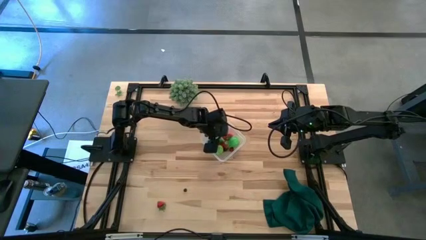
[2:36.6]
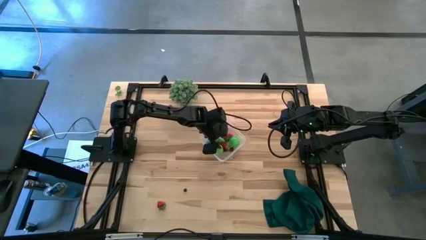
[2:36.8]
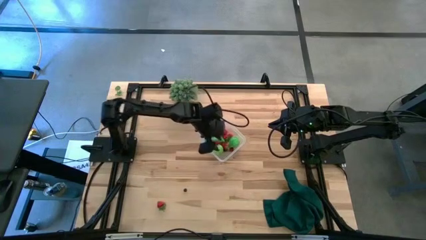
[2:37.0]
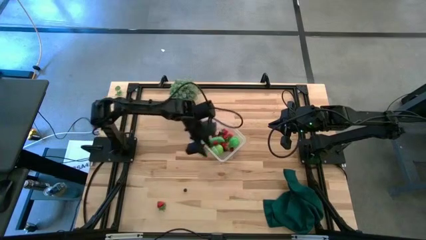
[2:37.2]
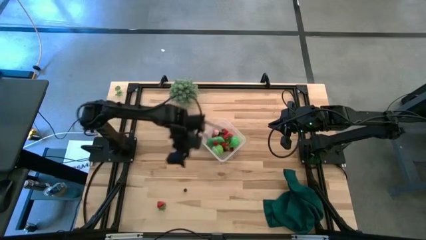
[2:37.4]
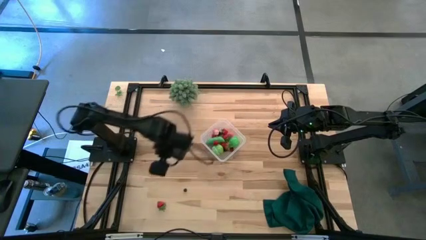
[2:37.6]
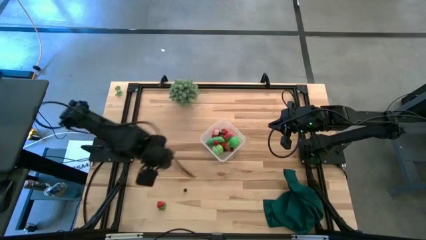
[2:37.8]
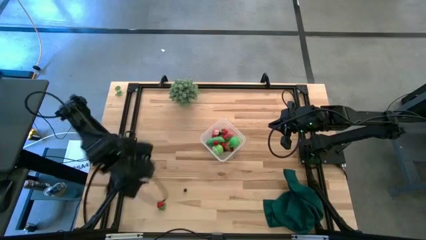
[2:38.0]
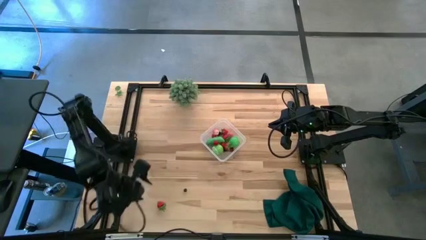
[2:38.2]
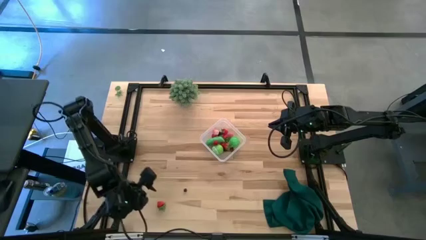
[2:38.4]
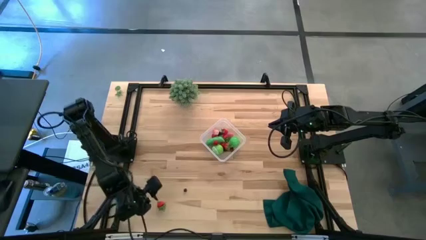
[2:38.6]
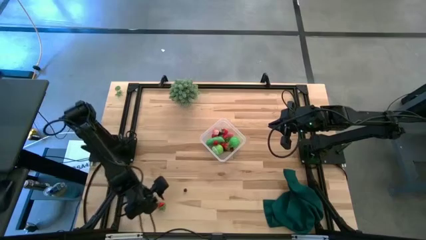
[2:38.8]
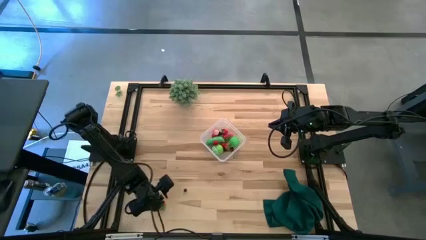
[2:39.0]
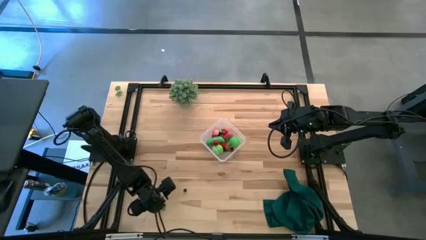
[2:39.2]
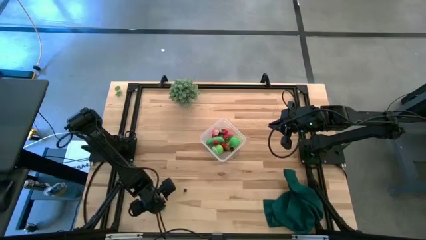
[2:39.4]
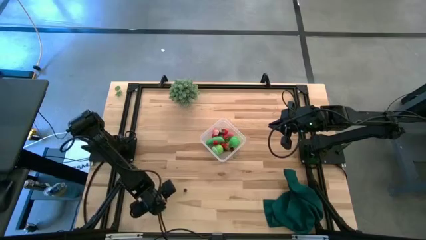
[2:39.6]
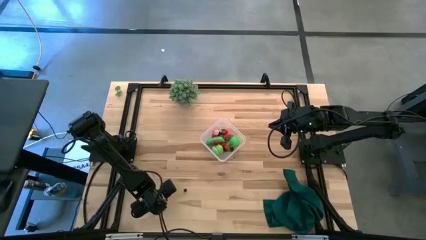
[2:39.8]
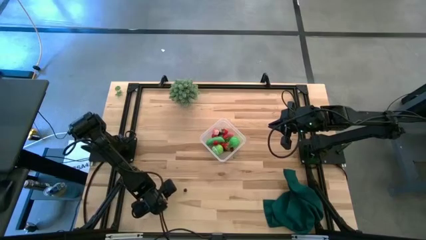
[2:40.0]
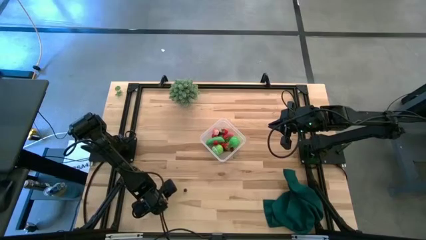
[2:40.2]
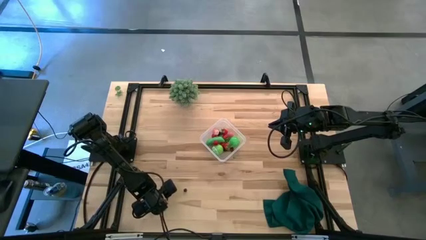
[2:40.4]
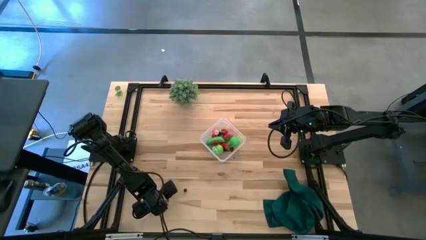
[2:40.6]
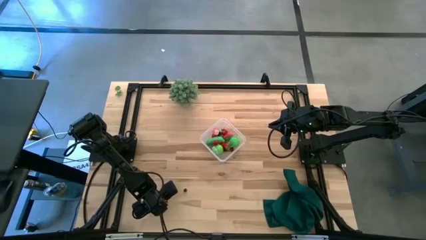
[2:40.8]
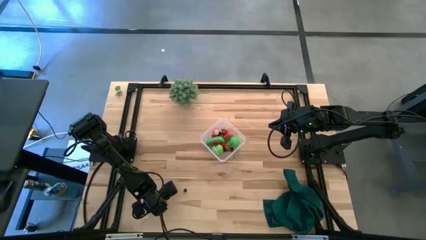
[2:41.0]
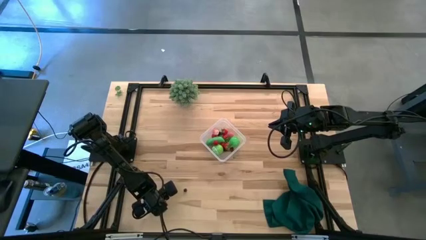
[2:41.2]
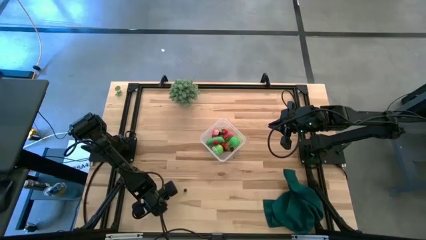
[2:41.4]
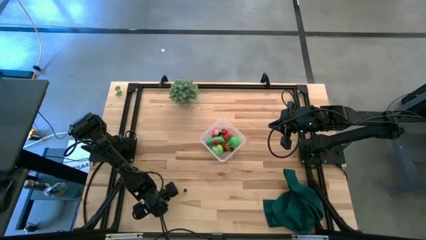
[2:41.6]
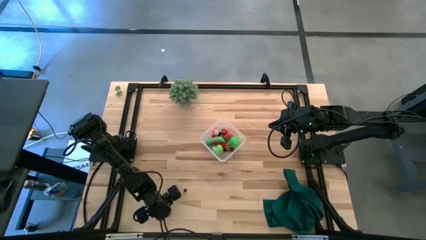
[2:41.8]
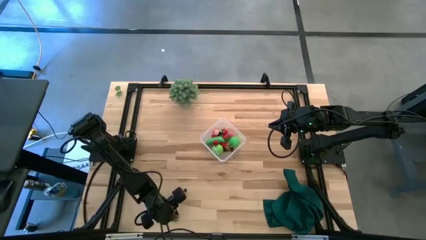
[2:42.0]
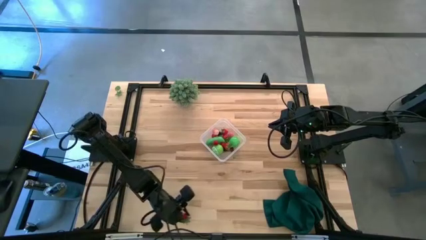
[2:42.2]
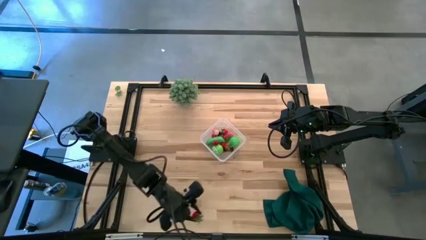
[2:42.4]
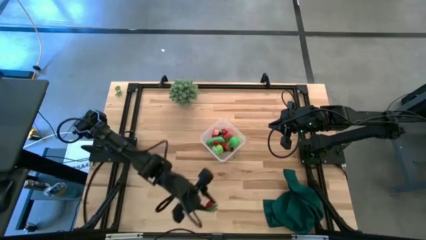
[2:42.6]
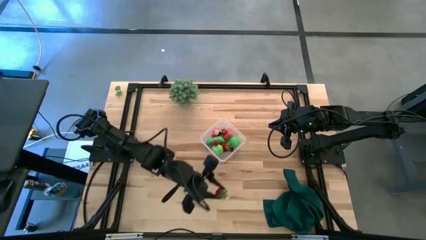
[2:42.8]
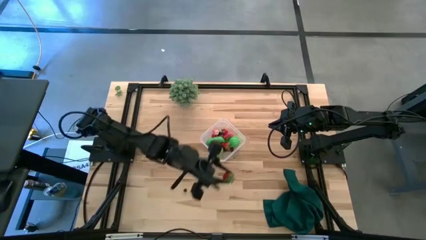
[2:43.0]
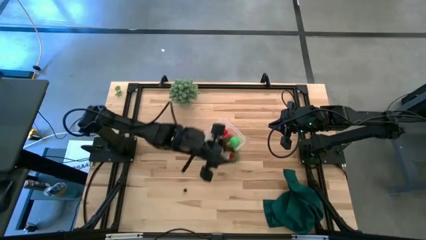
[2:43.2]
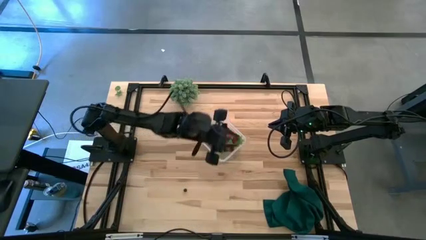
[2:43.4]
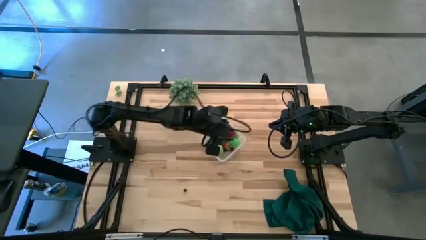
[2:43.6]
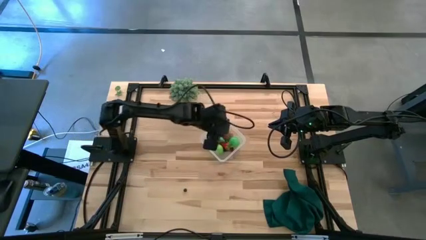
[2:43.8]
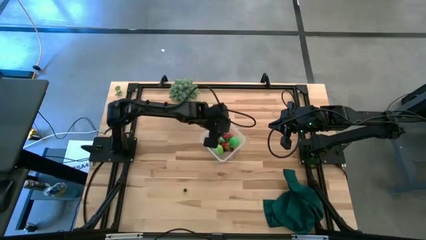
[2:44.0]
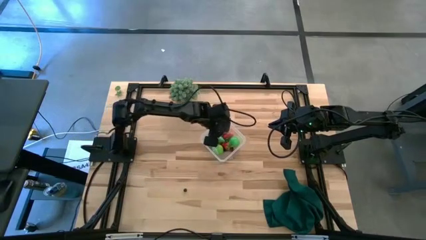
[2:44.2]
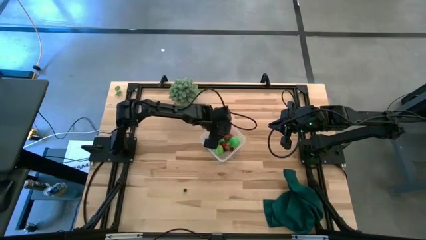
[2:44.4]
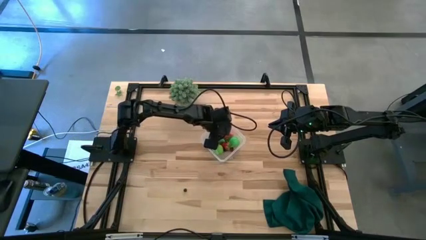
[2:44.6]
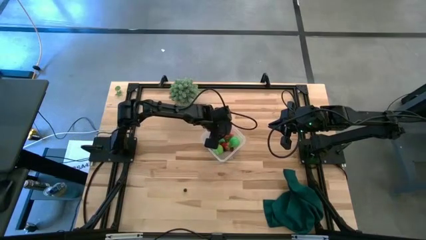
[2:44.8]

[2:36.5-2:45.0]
Task: Pick and placing Produce into tupperware
Put the red strawberry into the transparent bin

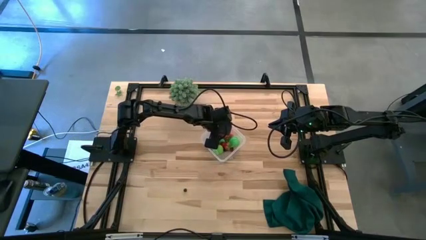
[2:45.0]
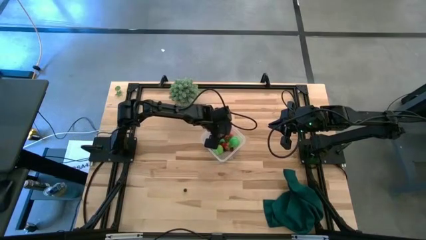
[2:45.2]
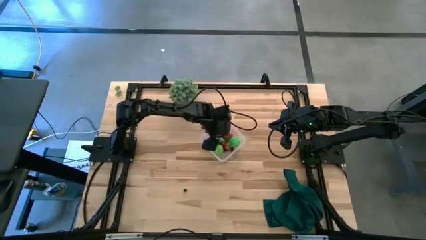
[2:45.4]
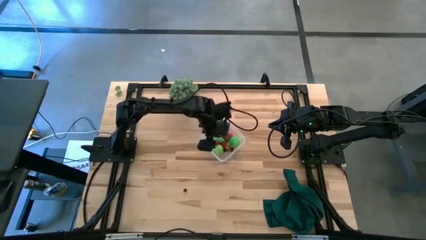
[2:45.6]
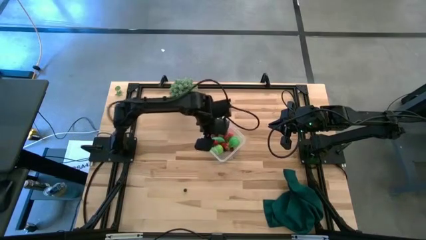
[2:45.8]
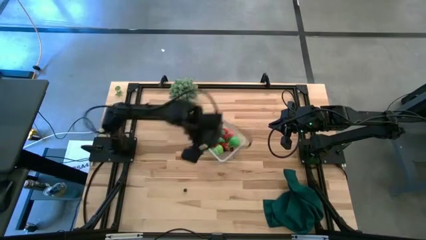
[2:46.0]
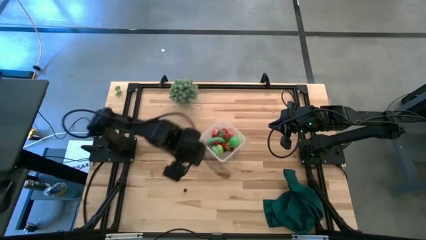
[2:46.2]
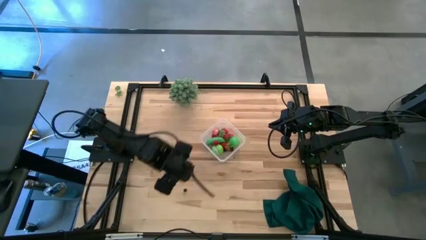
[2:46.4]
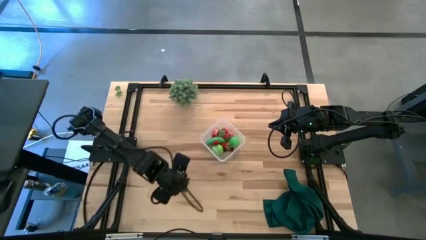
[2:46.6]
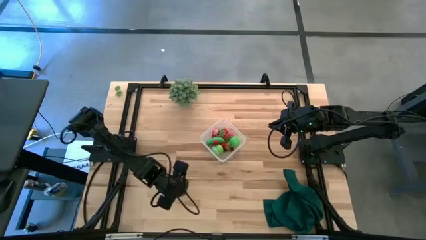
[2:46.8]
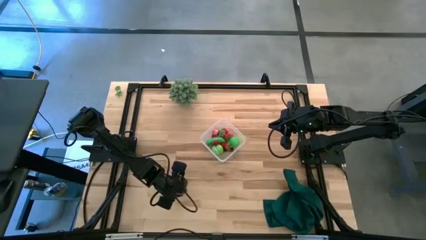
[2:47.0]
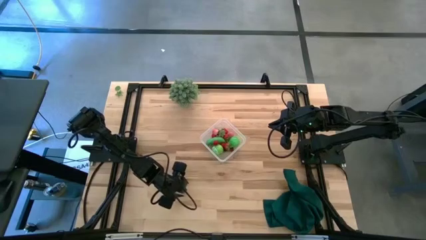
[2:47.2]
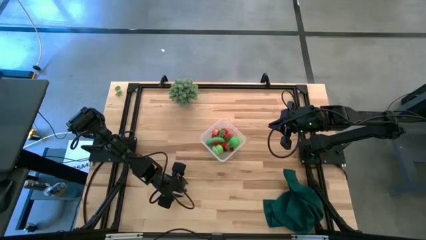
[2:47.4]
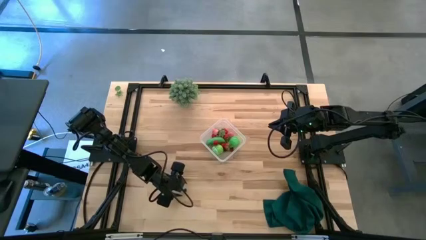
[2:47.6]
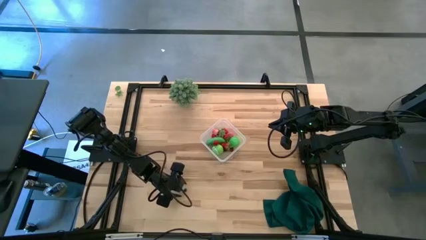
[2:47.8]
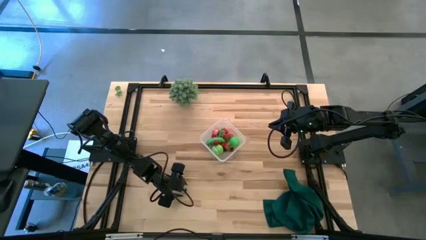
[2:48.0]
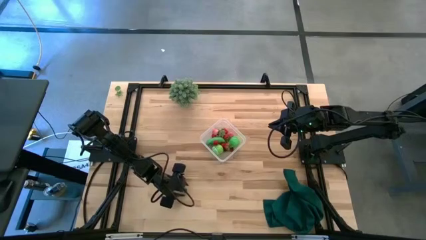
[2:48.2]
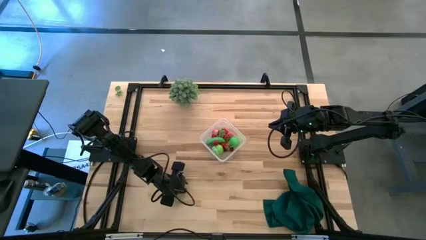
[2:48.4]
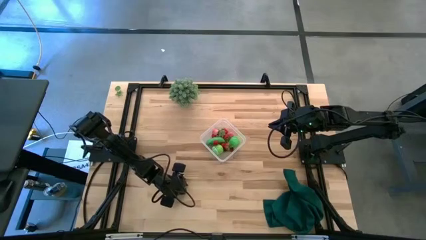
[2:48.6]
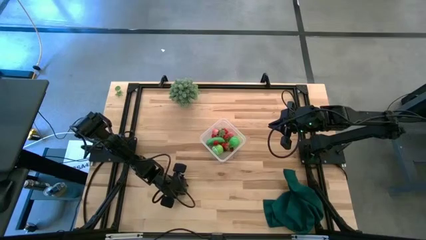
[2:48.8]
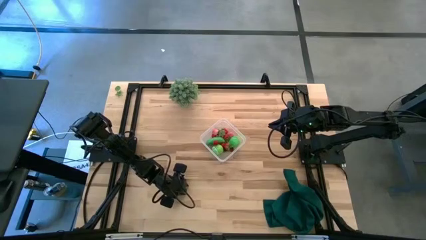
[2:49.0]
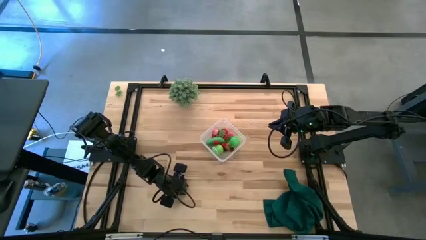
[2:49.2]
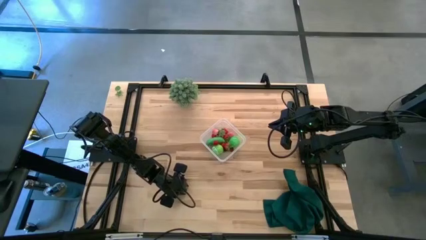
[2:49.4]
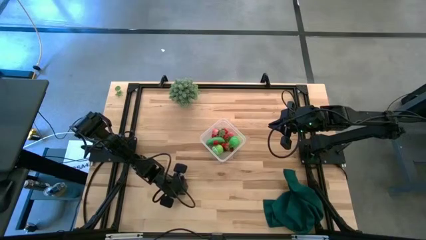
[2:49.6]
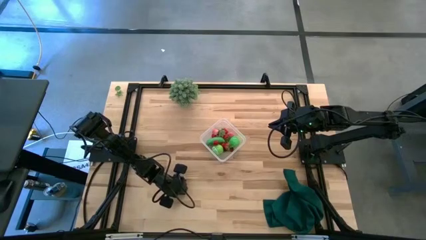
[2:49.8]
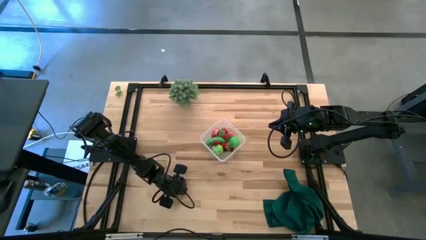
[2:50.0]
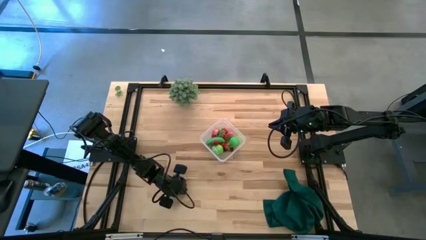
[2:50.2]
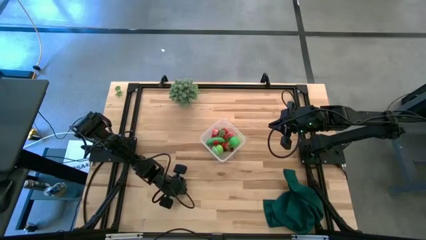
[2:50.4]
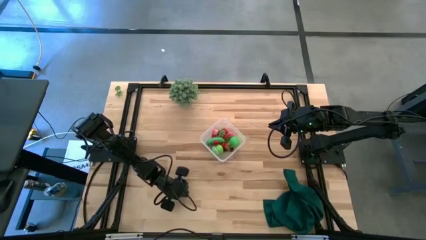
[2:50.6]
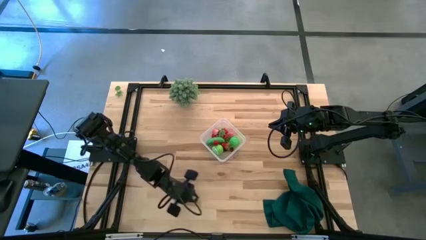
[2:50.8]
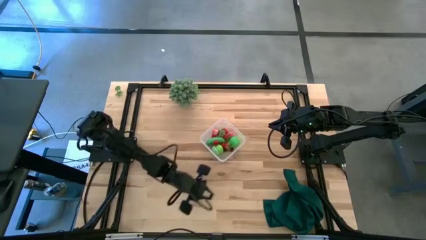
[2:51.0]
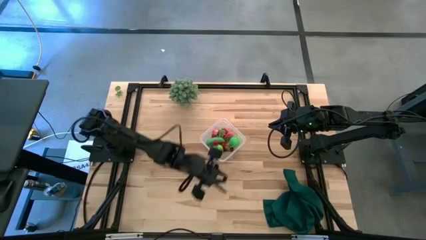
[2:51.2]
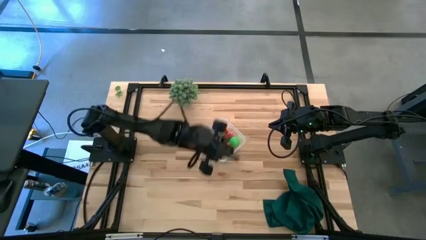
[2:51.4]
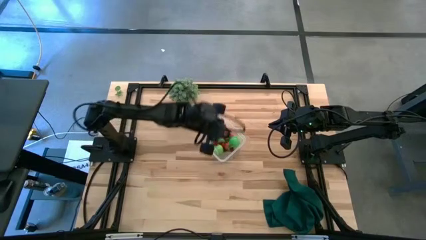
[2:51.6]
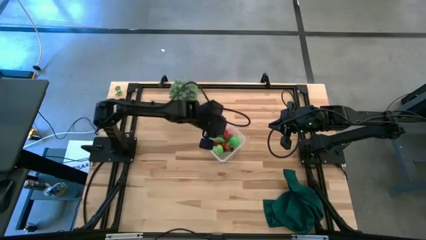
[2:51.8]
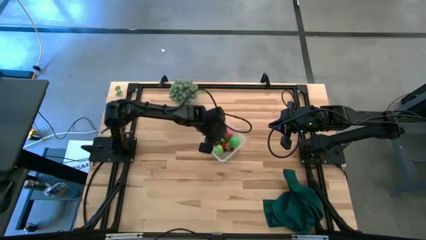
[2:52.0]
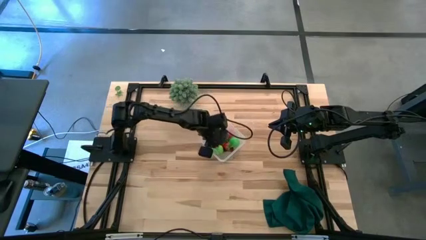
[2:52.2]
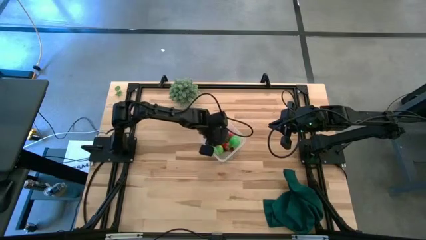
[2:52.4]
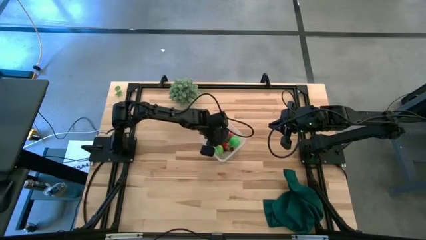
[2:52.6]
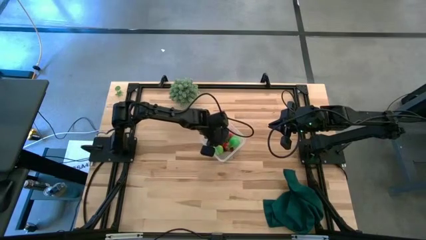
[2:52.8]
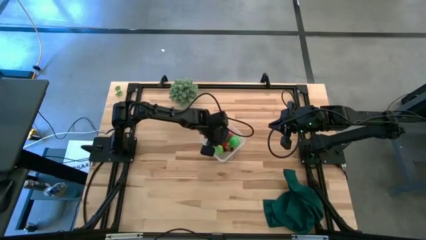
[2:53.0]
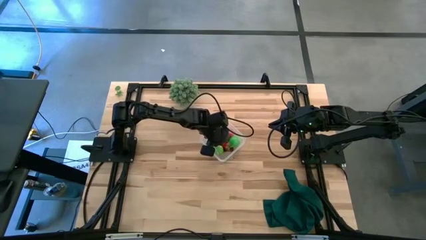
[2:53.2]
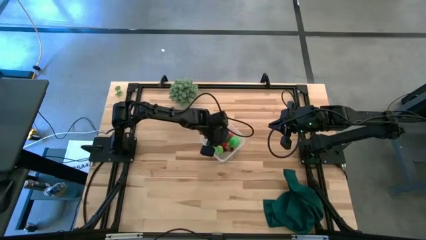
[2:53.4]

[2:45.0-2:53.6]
Put the blueberry into the transparent bin
